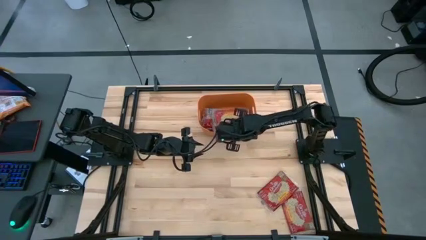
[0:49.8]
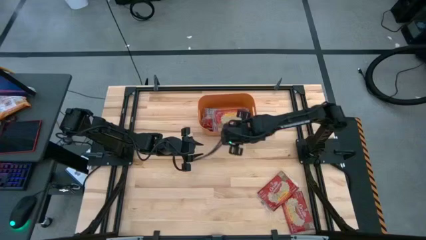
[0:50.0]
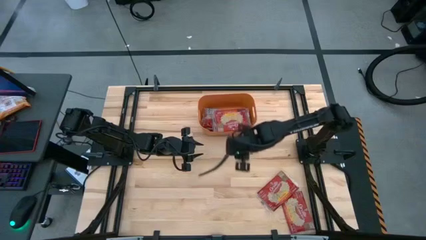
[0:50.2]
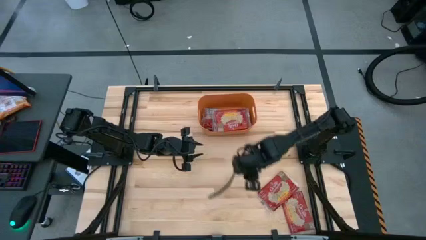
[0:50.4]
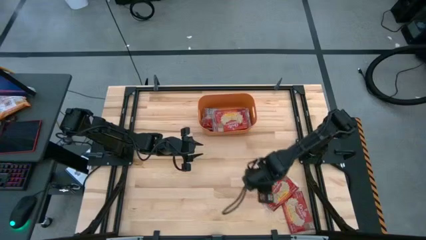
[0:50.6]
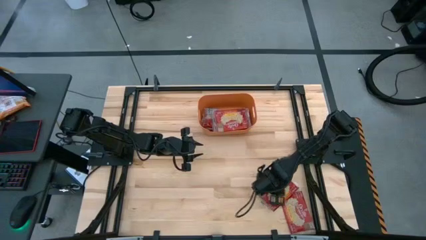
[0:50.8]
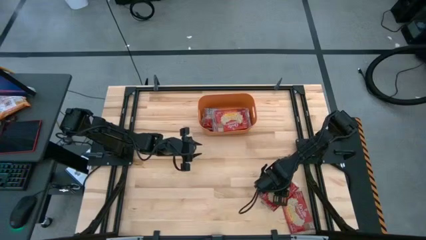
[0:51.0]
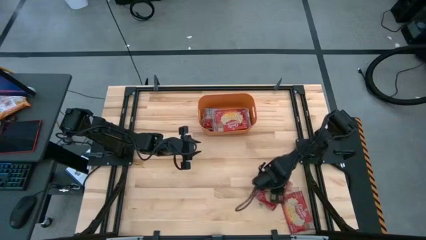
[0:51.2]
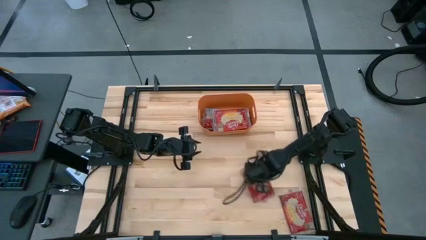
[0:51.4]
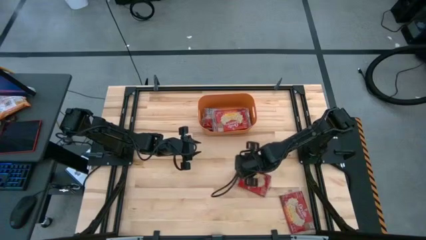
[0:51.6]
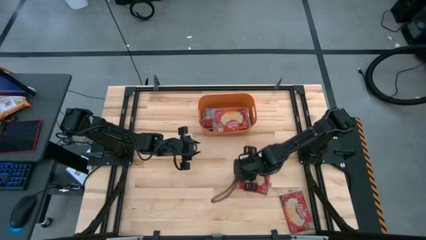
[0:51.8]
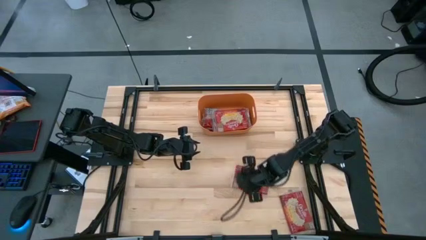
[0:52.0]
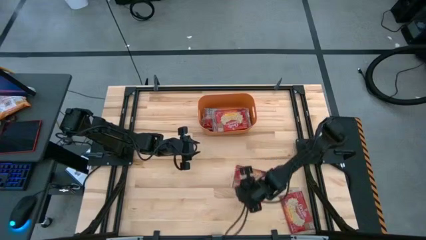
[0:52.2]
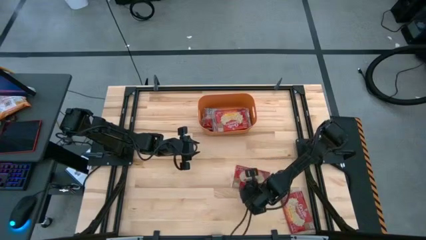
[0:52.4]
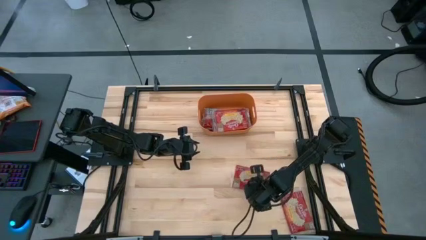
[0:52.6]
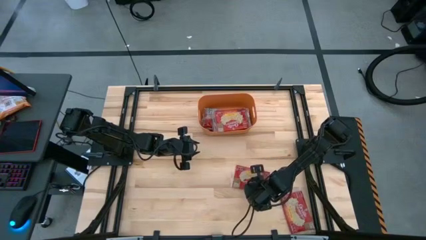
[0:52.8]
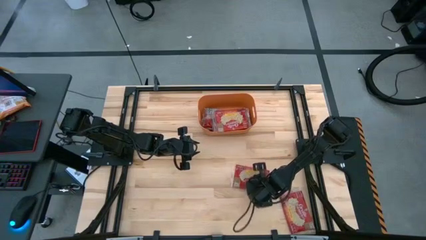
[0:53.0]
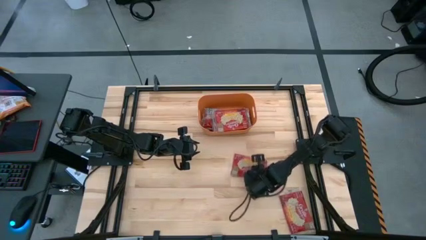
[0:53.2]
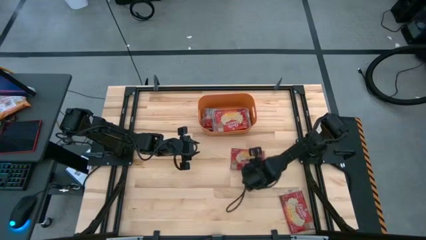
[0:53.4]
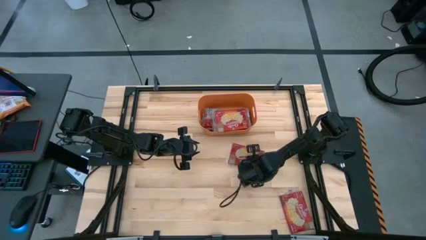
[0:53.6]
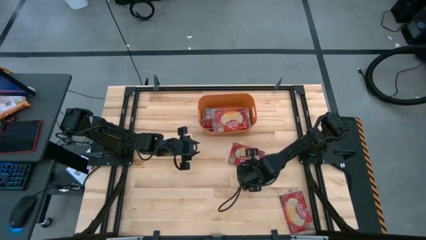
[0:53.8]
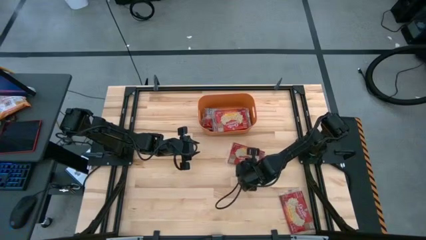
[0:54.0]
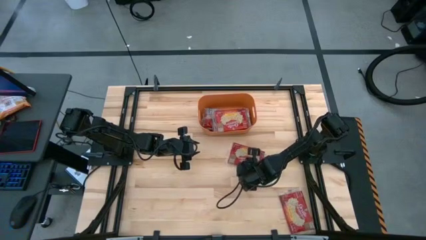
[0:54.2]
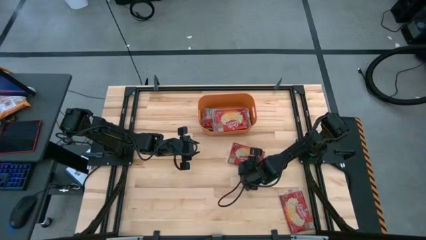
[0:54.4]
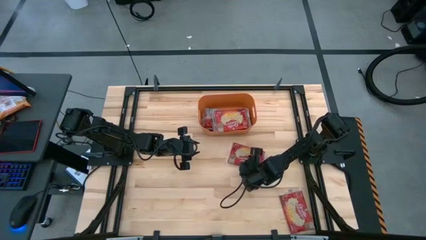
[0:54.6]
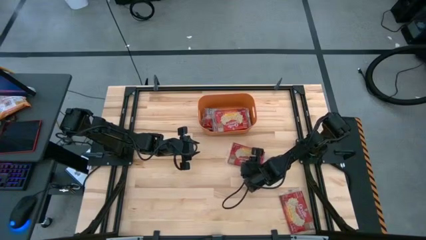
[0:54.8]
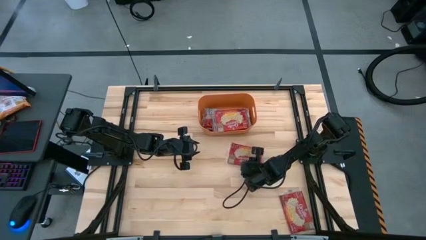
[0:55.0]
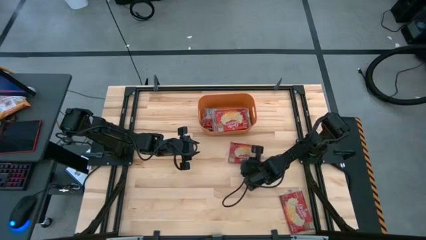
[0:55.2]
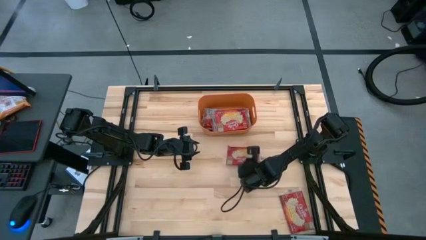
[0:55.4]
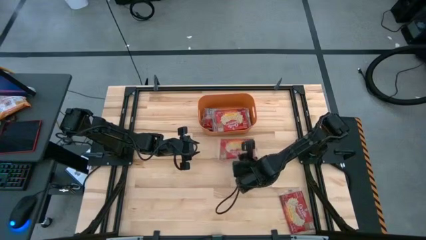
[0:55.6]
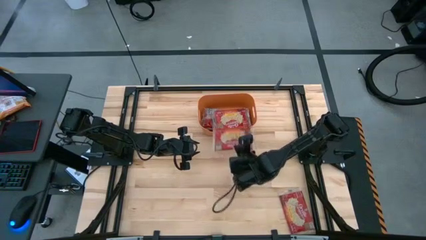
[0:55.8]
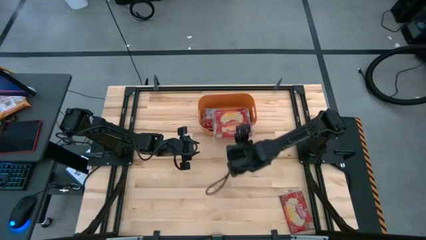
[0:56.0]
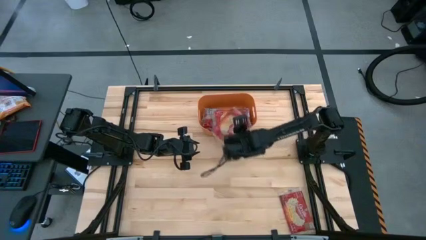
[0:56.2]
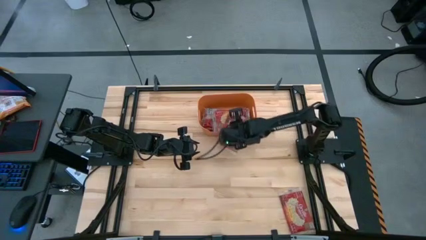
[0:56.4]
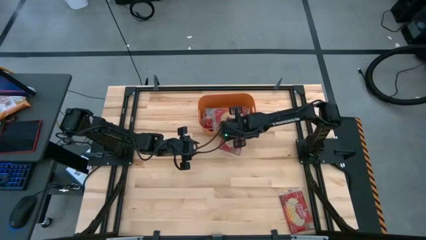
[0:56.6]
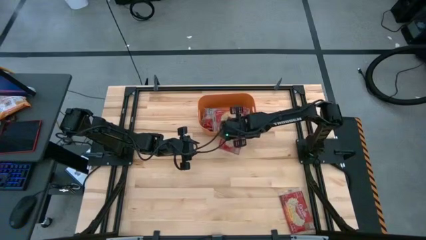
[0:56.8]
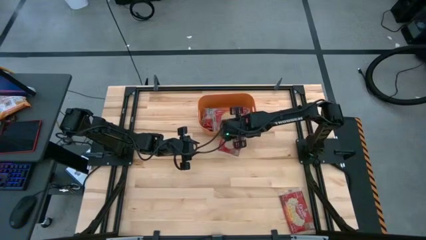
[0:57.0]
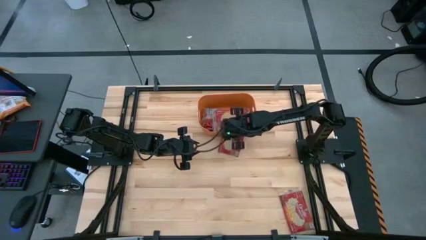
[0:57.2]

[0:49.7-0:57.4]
Task: Sort popcorn bags into baskets
Put the top red popcorn bag into the orange bin

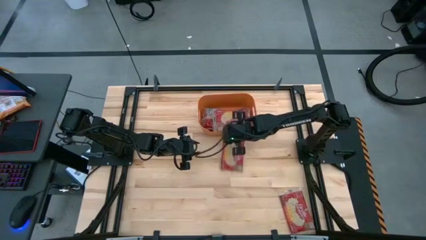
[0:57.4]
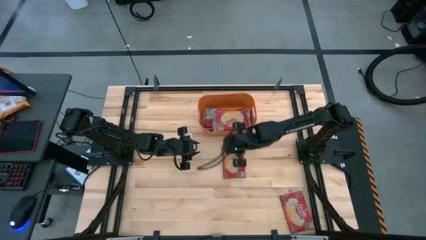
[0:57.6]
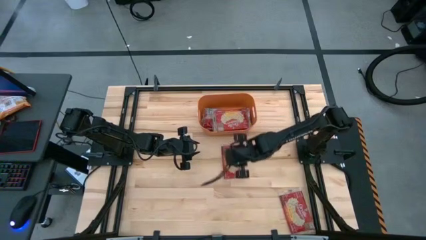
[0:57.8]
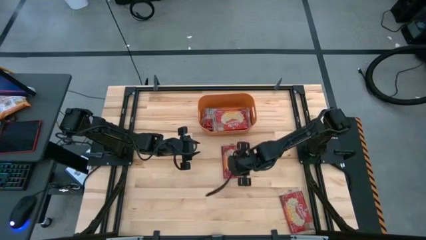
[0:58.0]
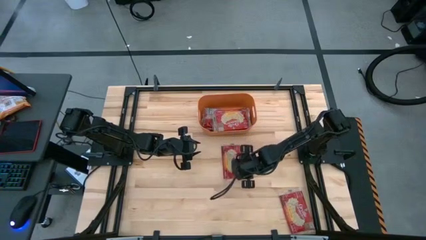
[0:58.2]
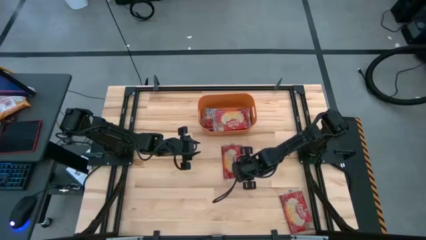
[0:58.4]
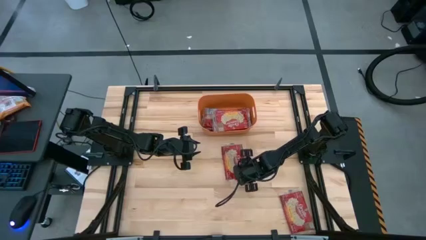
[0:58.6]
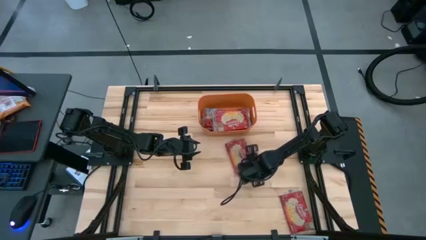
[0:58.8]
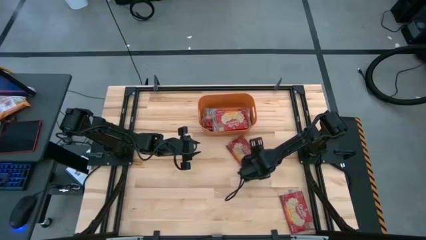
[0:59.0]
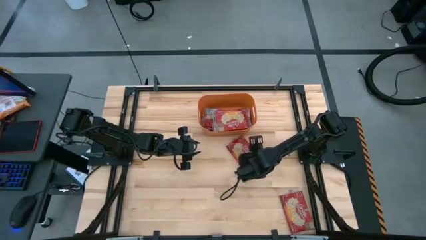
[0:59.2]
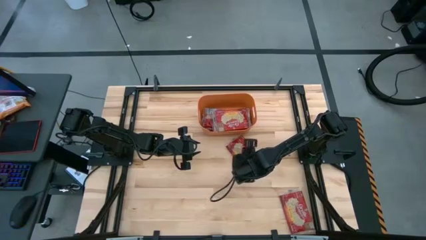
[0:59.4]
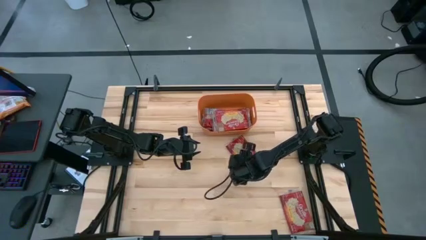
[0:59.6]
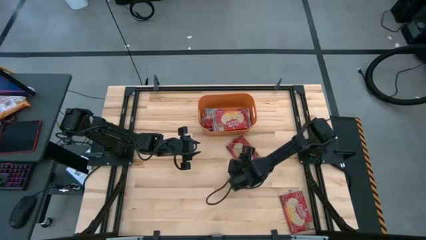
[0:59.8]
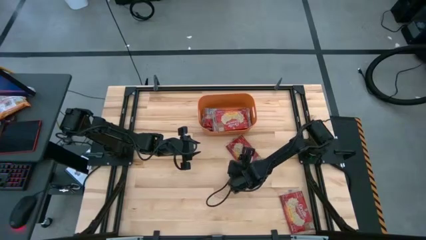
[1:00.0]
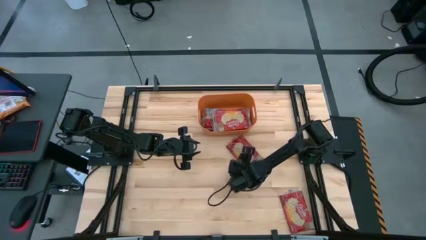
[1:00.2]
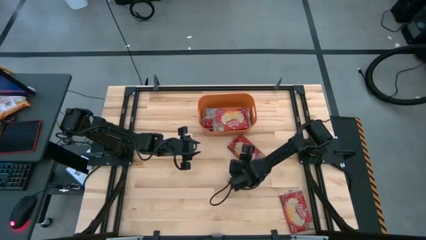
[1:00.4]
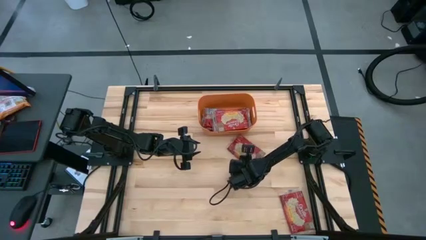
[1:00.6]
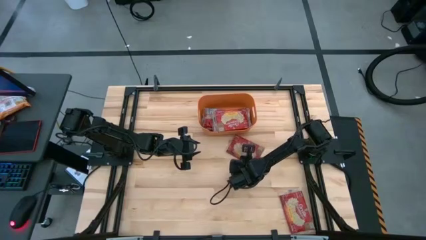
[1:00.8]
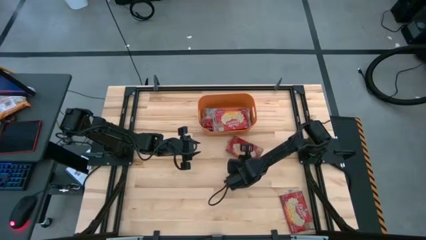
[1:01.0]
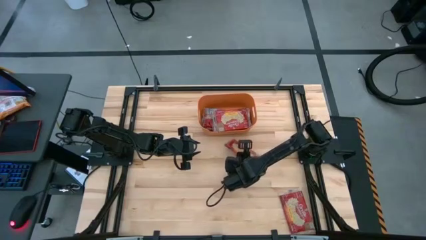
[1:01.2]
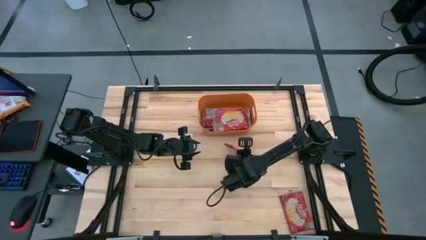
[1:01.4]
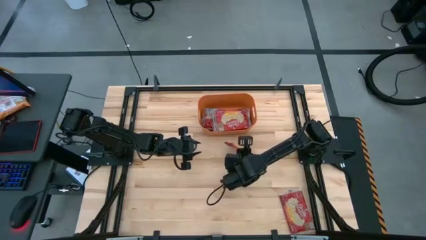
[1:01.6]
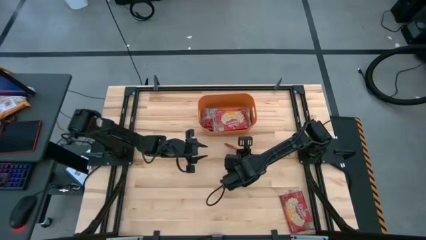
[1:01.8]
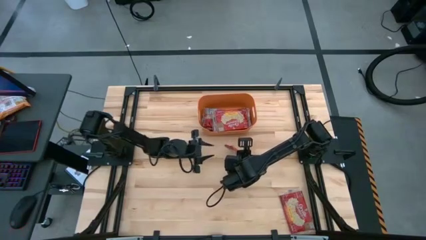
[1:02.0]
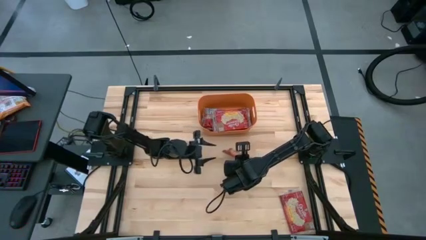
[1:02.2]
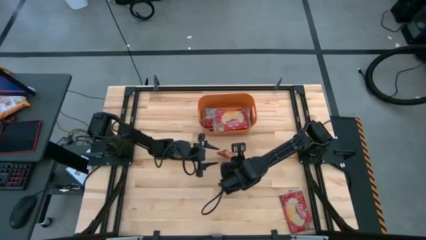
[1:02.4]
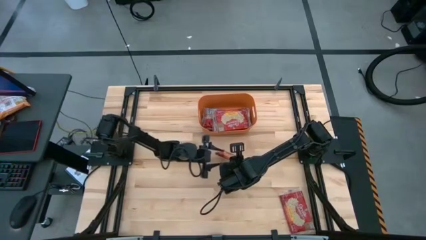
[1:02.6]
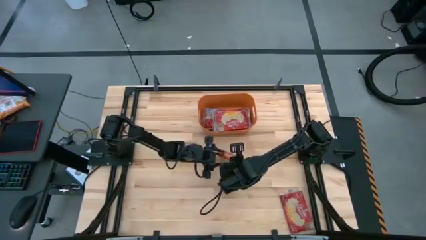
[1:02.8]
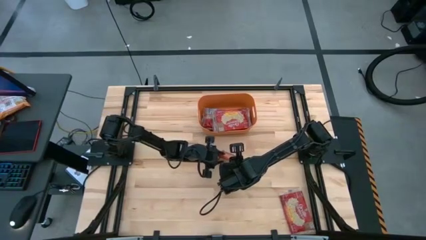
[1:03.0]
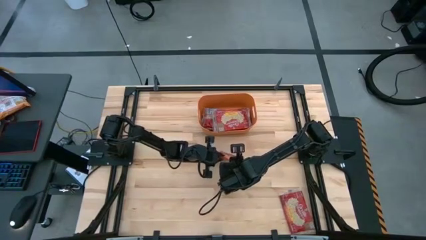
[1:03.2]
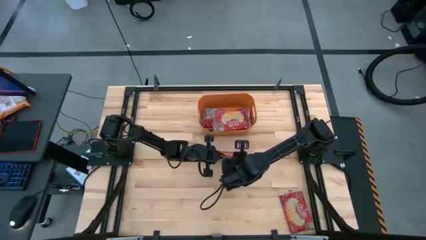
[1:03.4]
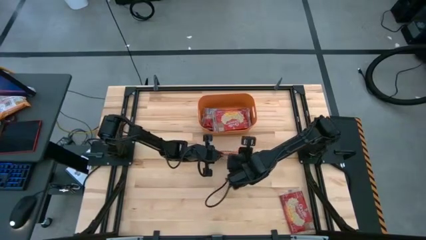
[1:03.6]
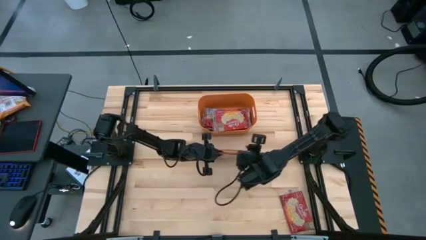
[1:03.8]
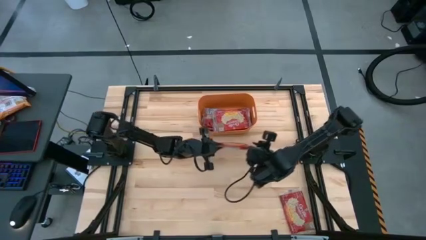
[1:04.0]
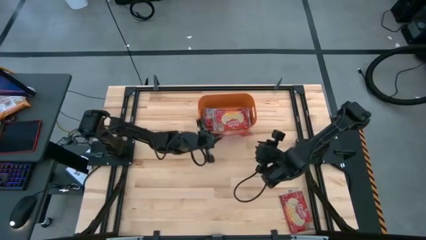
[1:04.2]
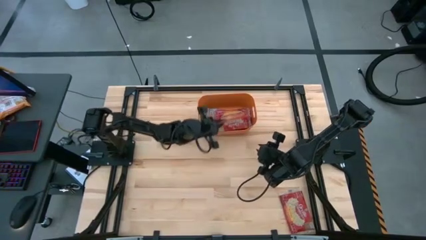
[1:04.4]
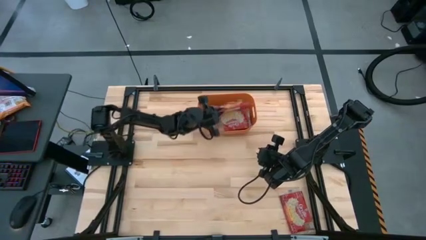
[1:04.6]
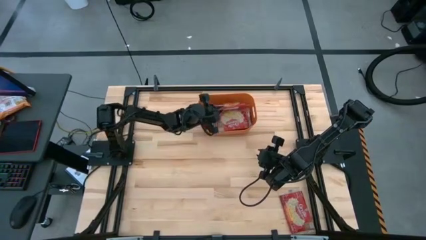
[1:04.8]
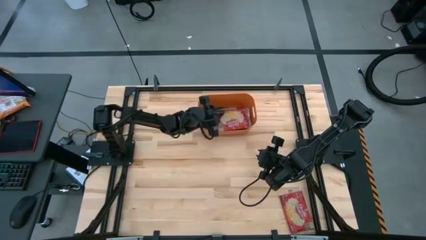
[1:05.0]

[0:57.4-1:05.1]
Put the top red popcorn bag into the orange bin
